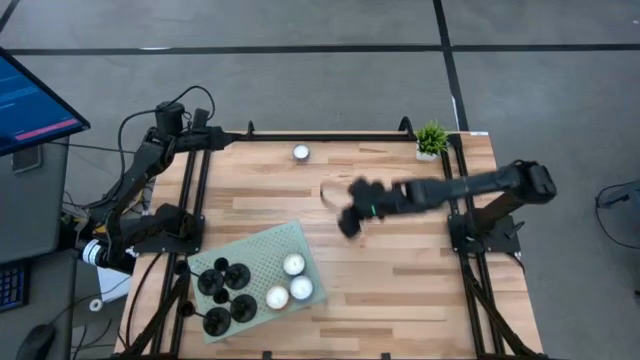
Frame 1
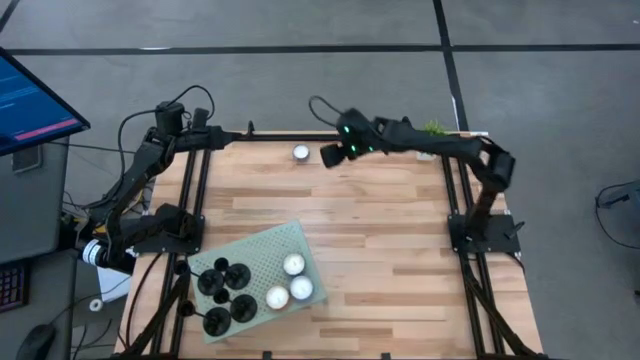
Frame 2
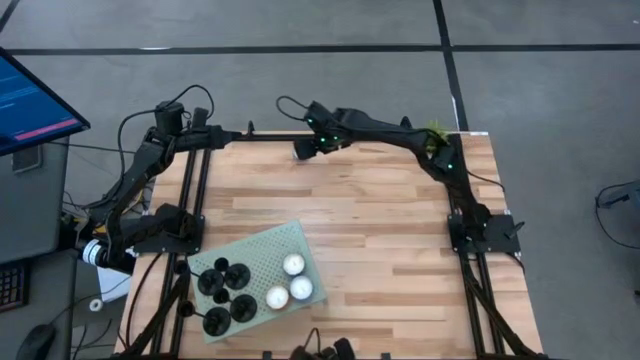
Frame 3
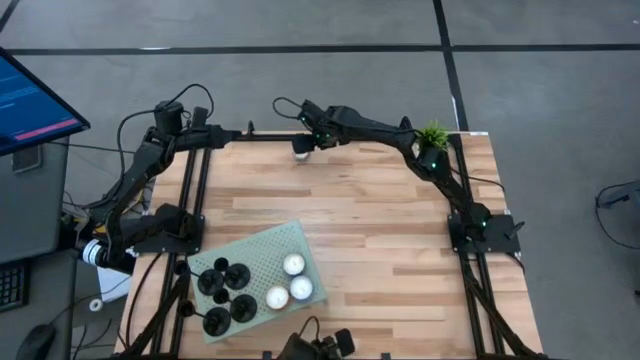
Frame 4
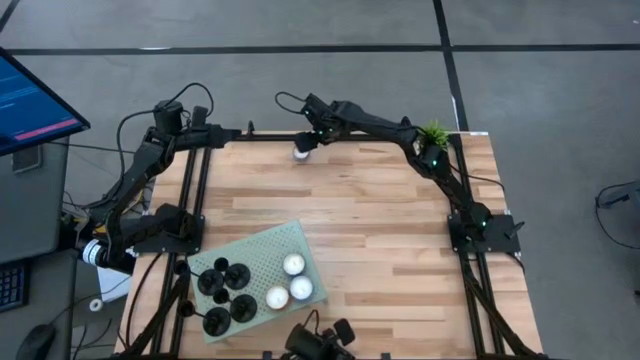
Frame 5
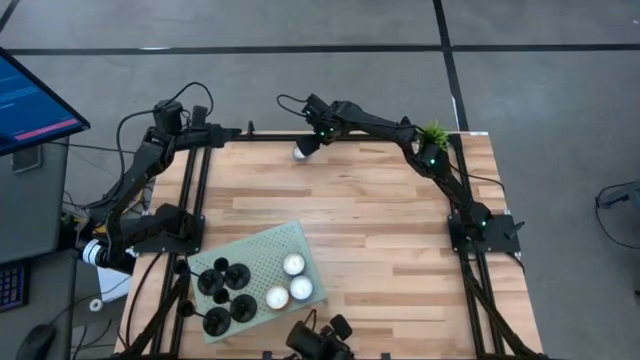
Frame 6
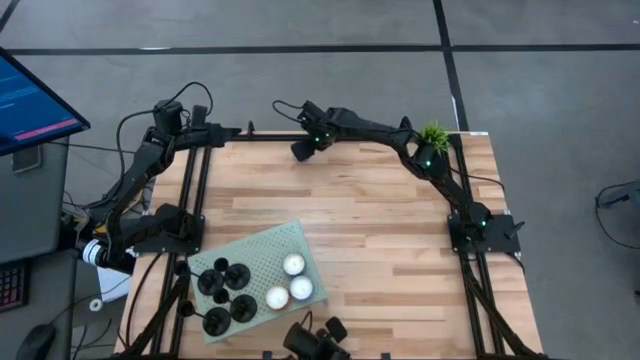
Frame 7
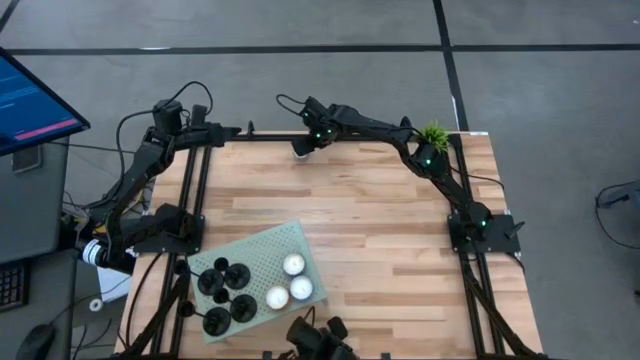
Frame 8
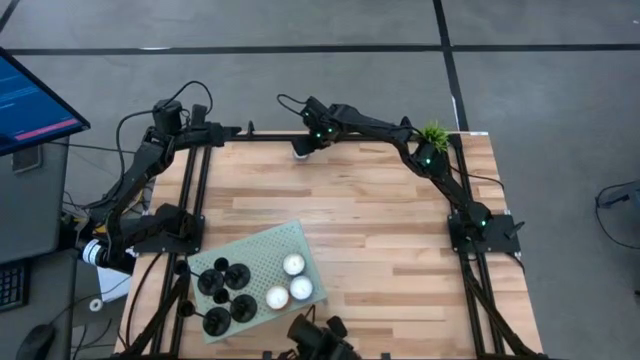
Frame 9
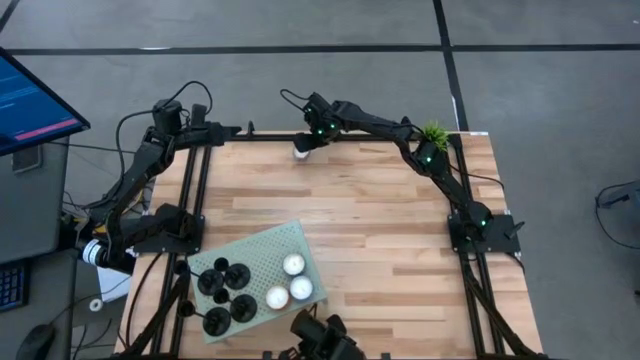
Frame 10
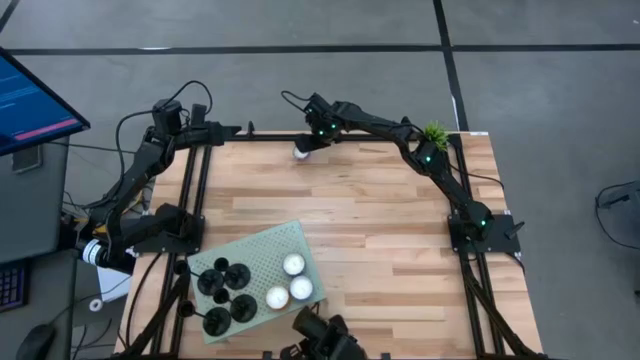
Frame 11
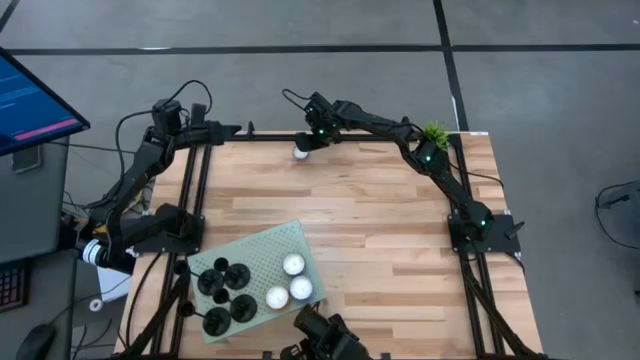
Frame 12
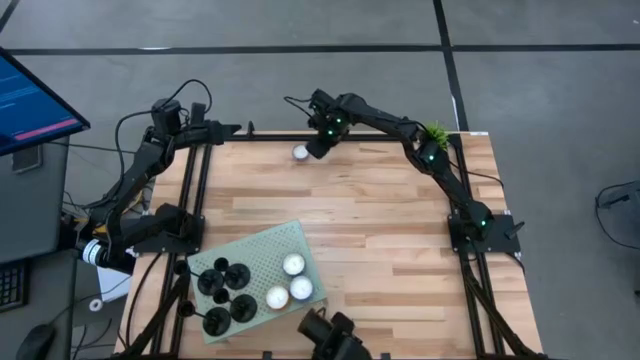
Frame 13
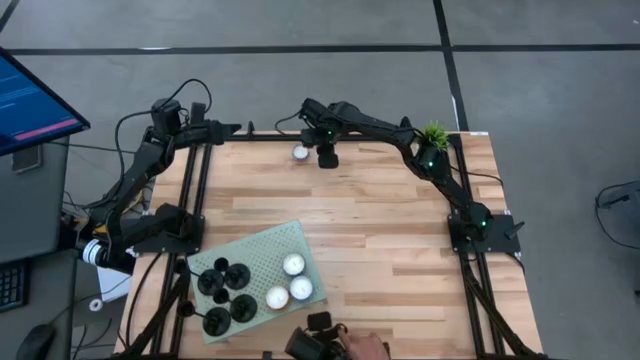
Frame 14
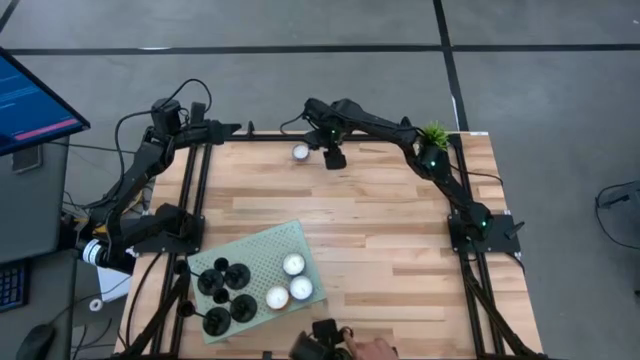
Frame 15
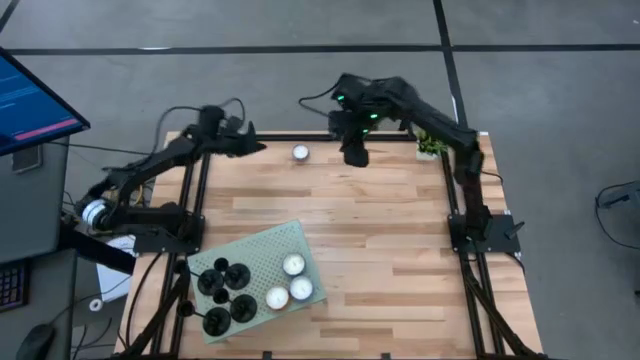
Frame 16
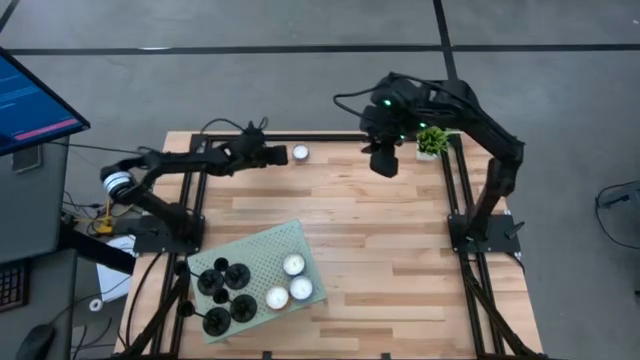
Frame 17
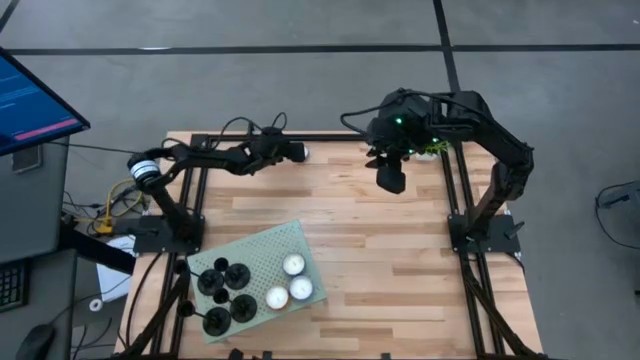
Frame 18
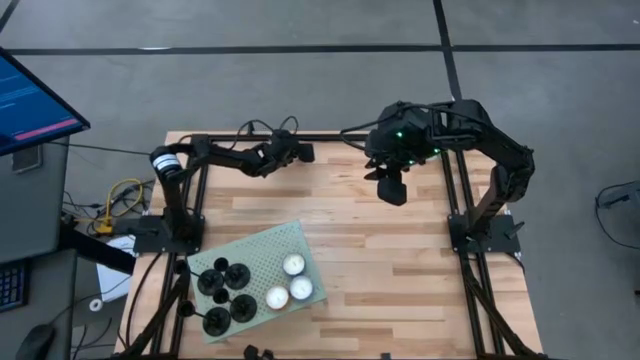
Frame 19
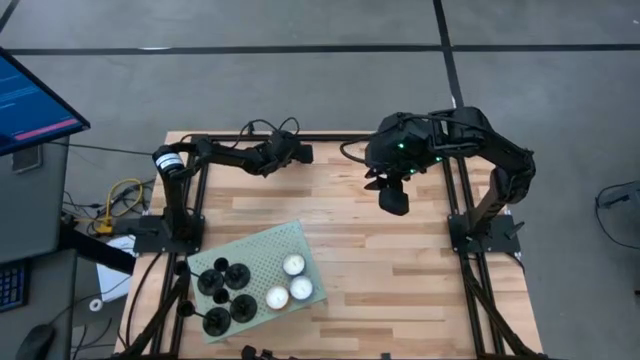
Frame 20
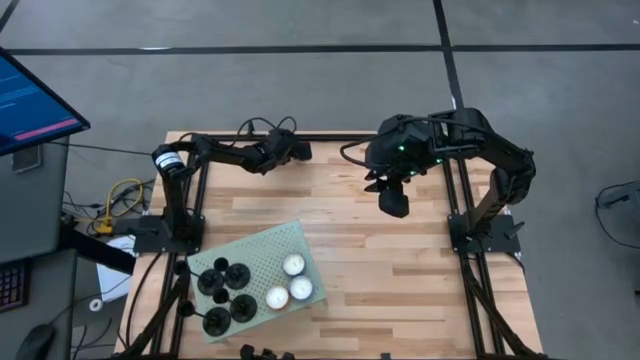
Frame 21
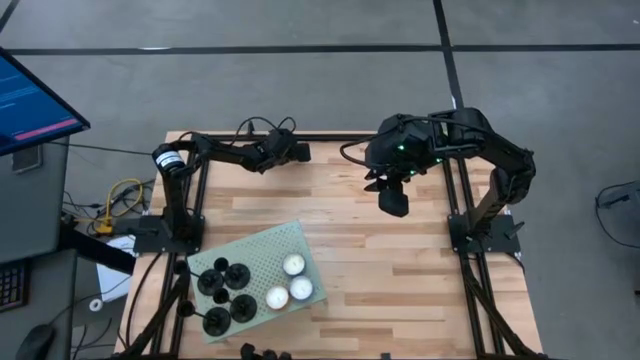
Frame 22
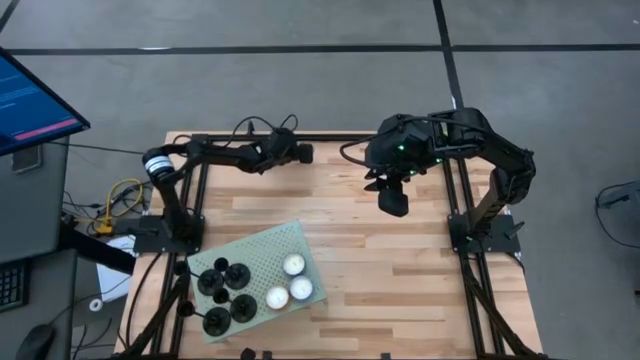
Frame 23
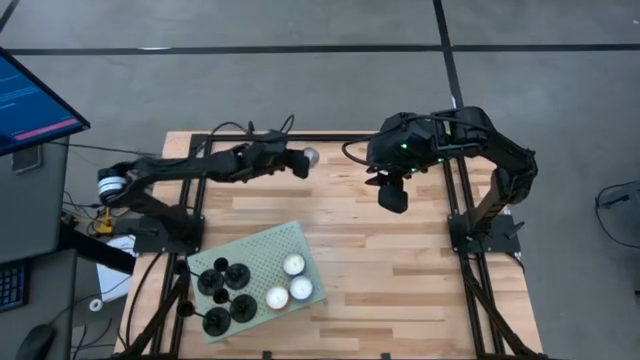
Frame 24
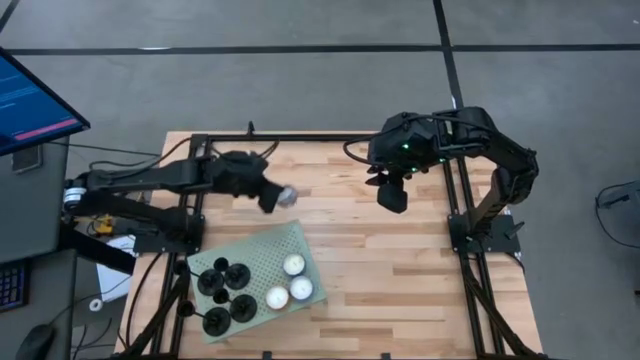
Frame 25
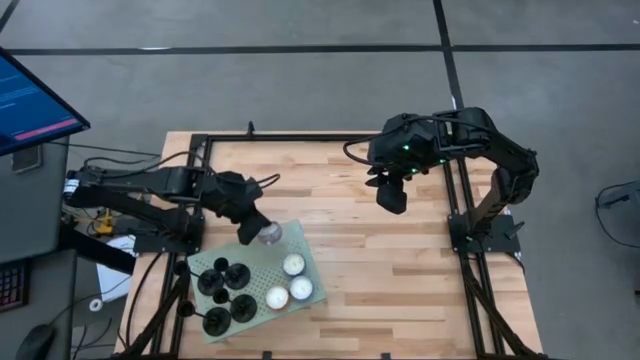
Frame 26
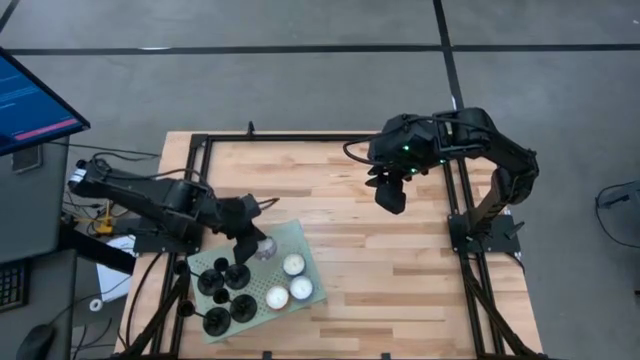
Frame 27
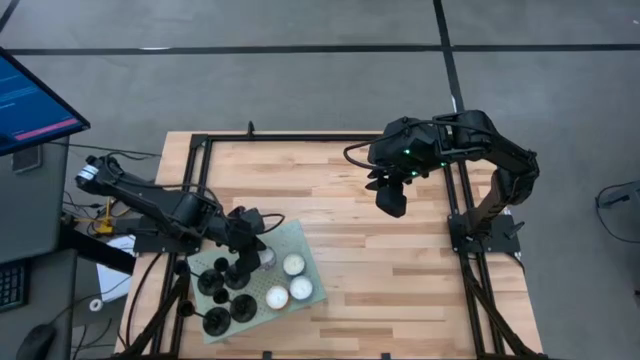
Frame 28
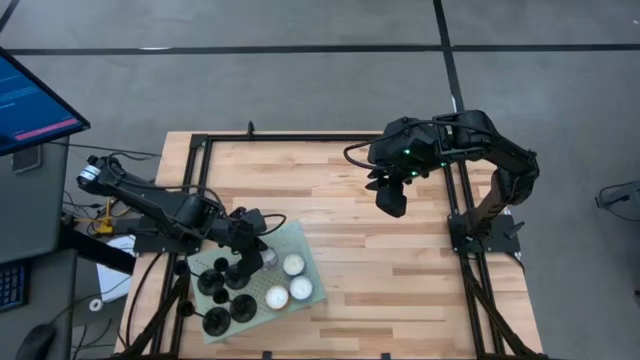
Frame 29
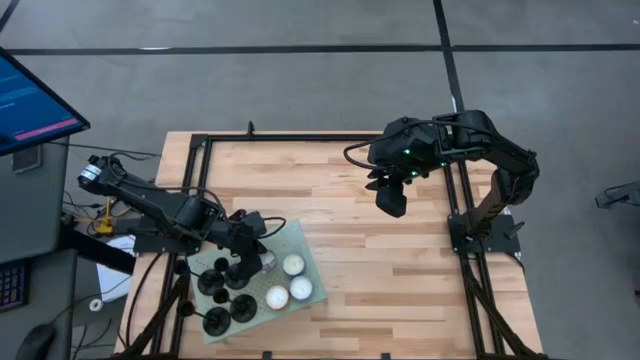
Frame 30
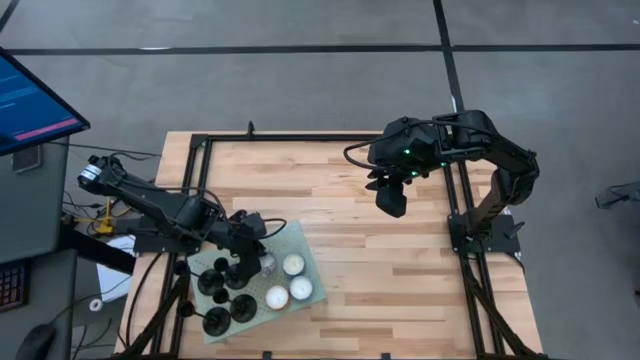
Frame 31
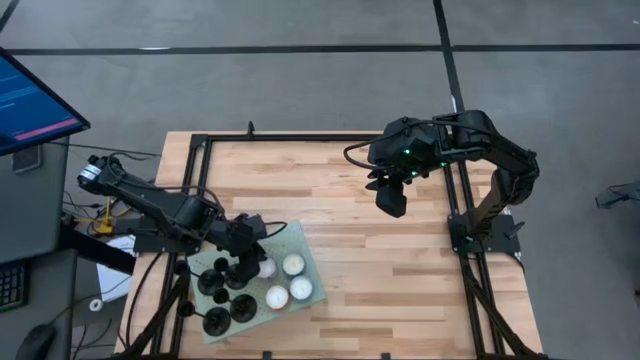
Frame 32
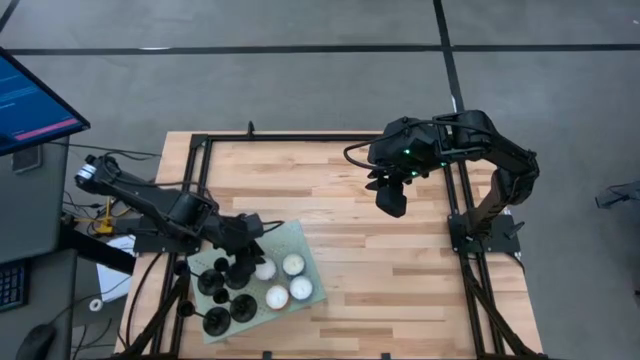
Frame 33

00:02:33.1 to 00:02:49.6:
Task: Stock candles on shelf
Put the red scented candle on the shelf

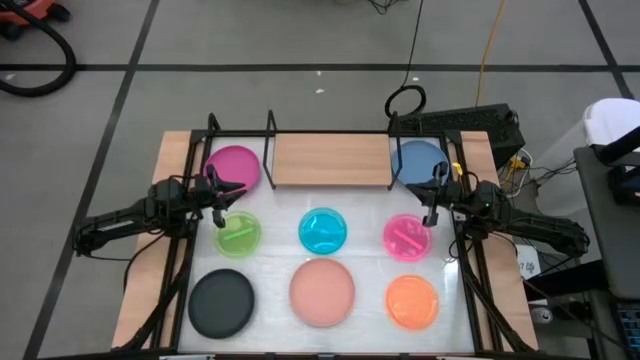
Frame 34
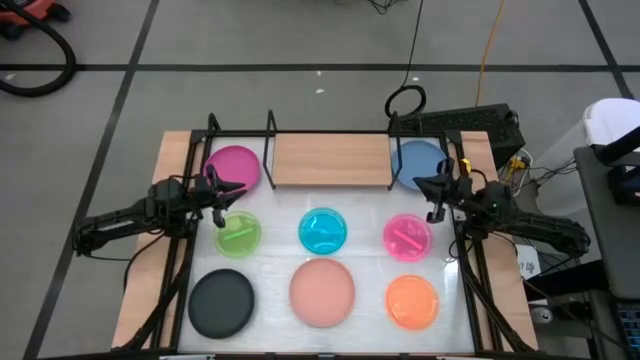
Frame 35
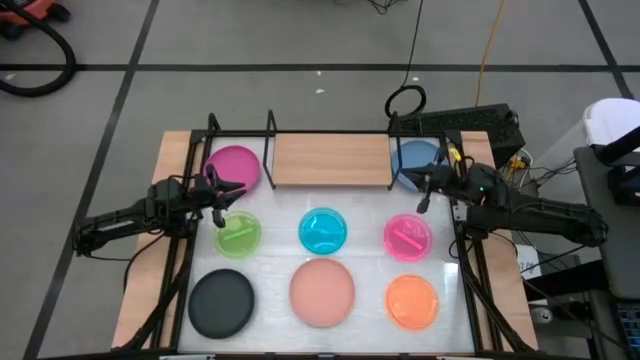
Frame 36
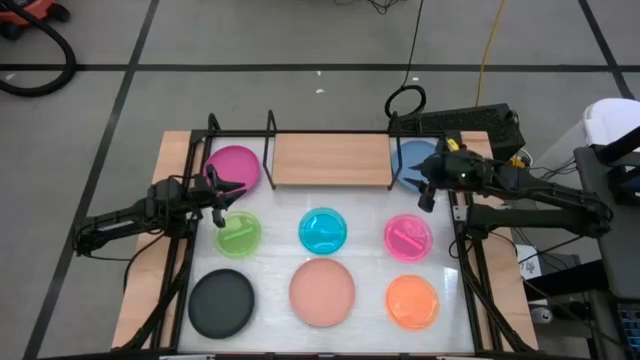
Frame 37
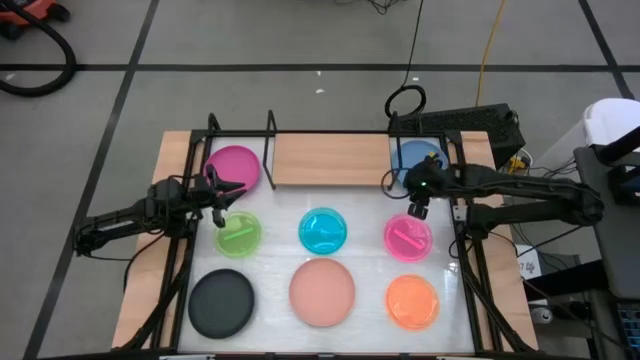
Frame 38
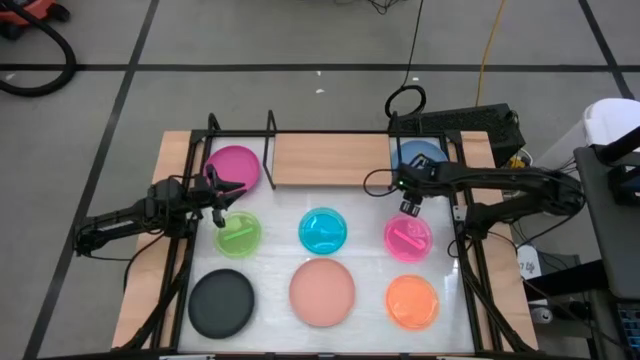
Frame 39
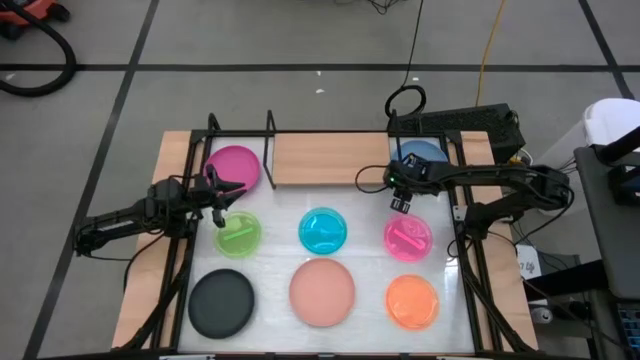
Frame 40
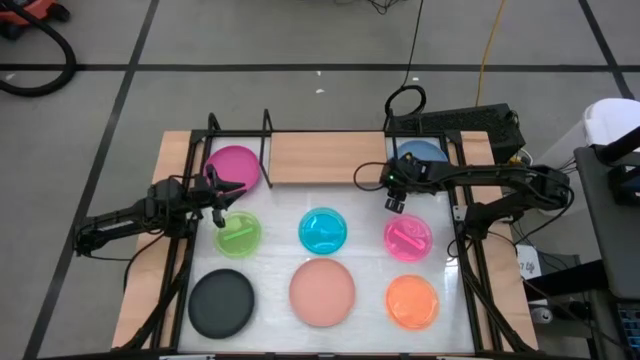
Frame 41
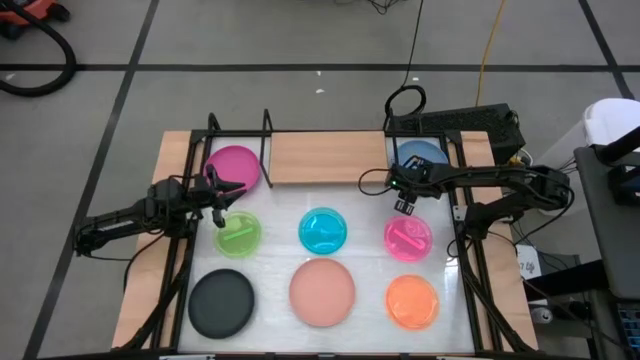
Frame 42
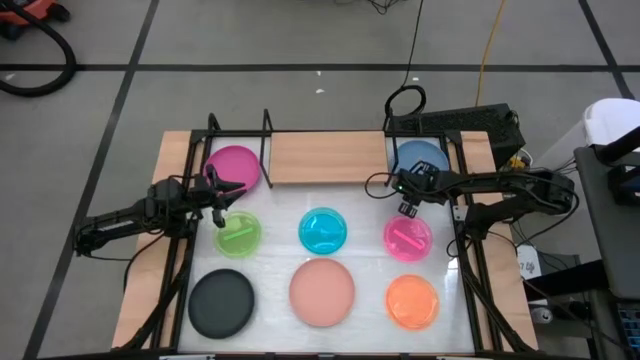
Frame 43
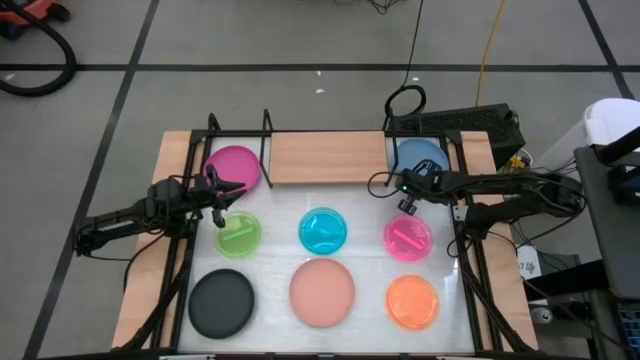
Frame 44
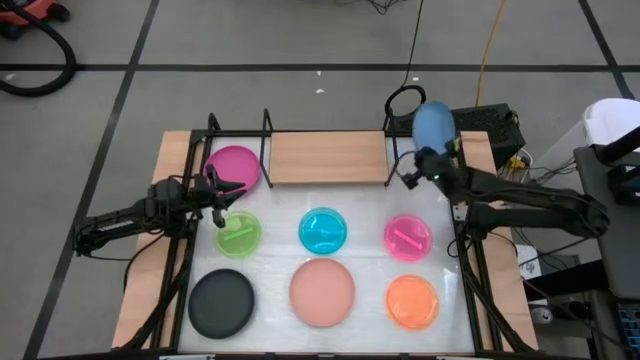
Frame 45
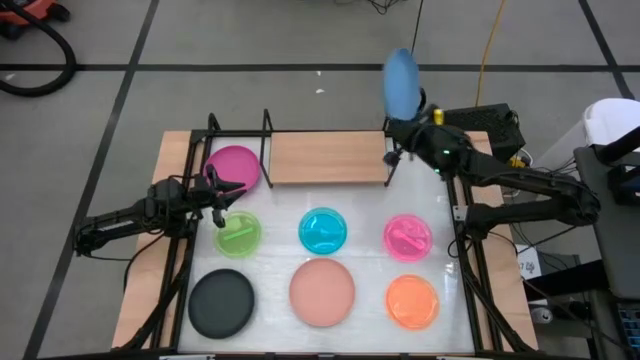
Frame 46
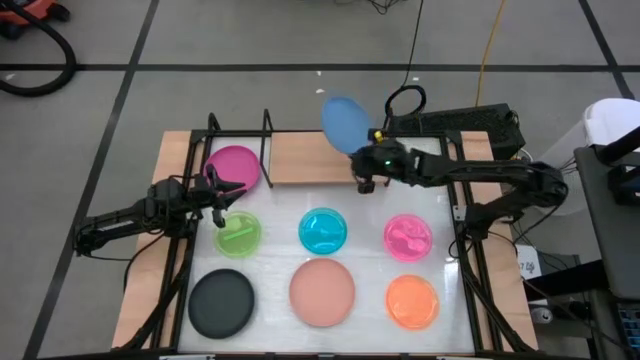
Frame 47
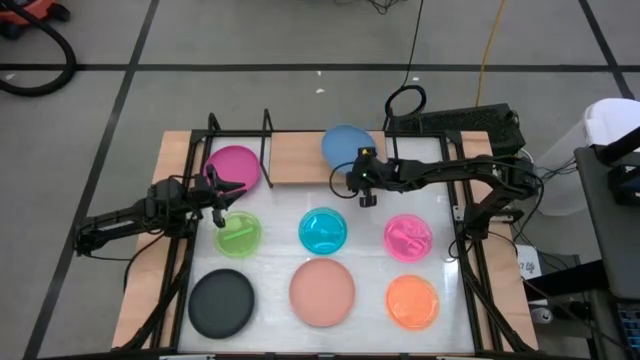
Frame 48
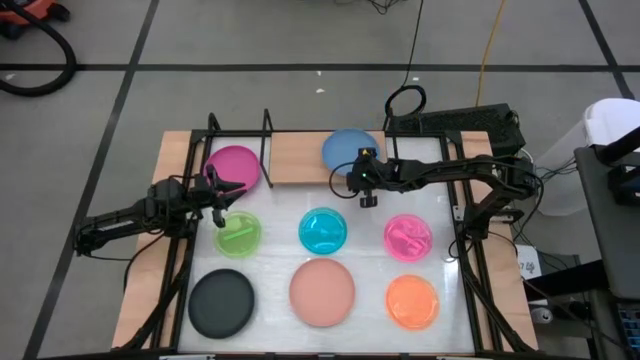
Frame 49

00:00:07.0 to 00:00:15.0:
Task: Place and stack plates onto a shelf
Put the large blue plate on the shelf
